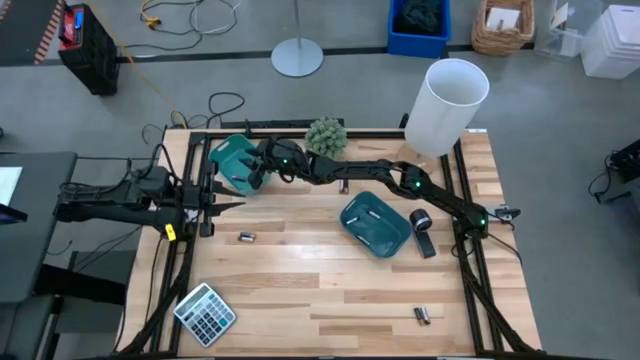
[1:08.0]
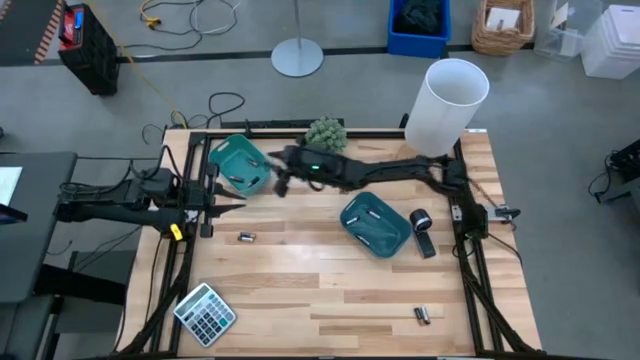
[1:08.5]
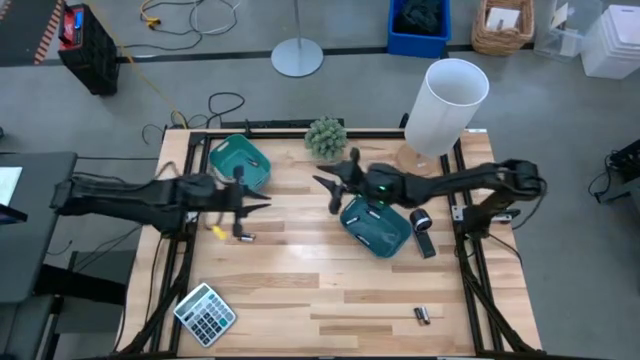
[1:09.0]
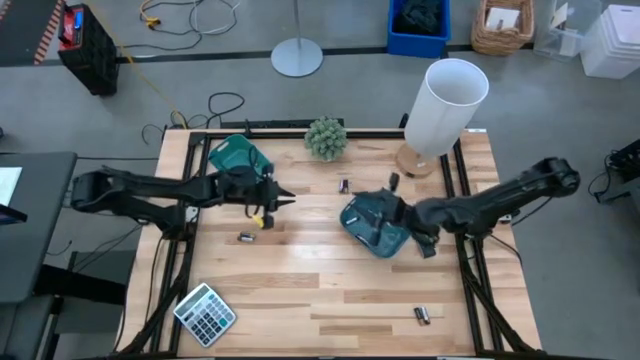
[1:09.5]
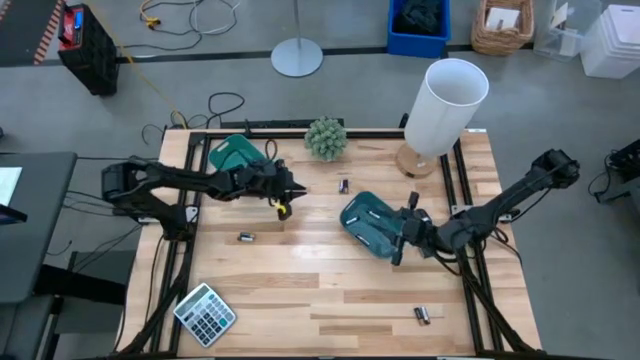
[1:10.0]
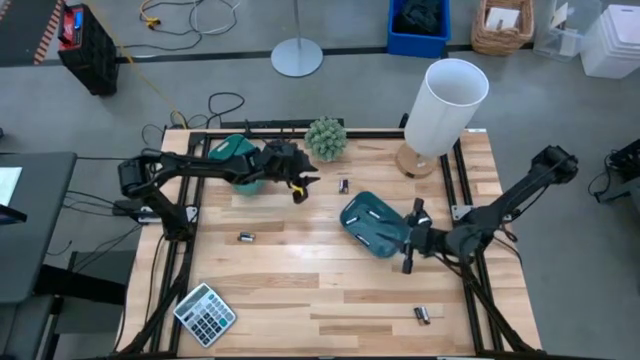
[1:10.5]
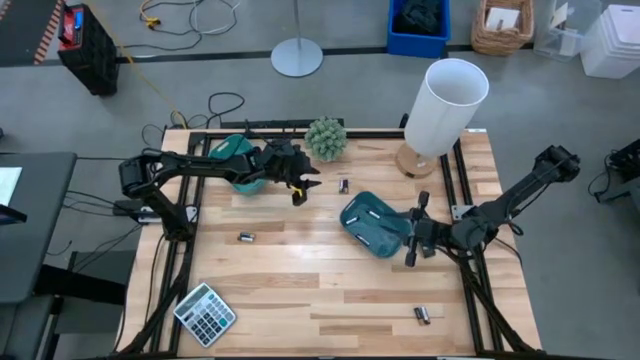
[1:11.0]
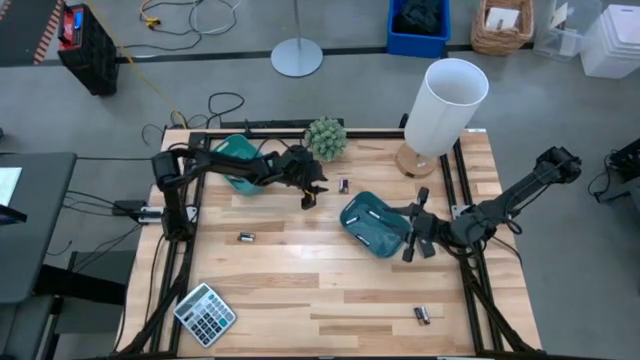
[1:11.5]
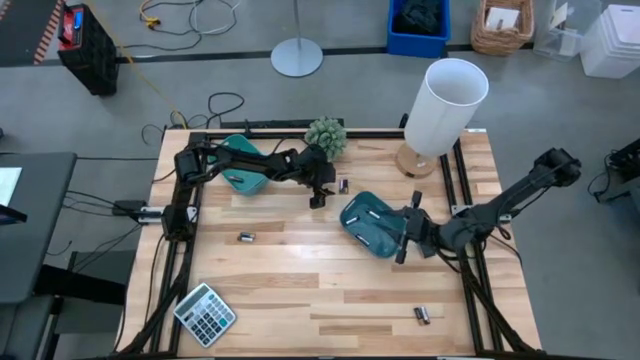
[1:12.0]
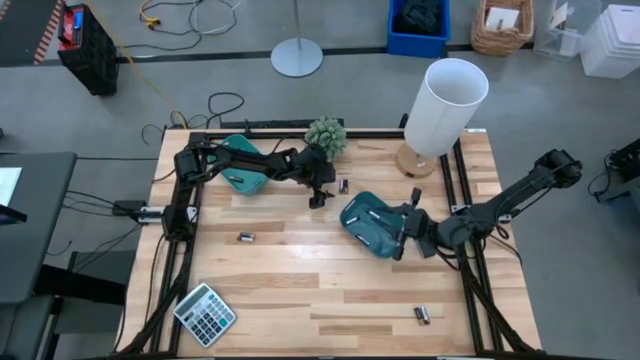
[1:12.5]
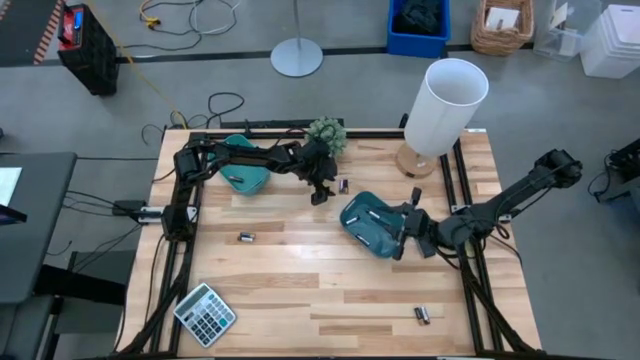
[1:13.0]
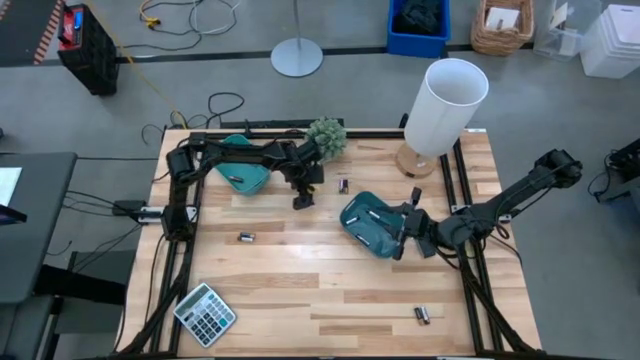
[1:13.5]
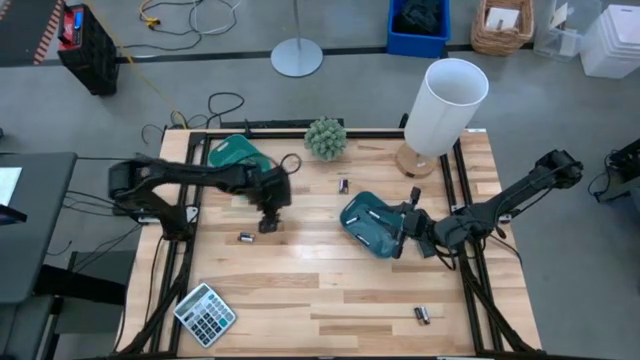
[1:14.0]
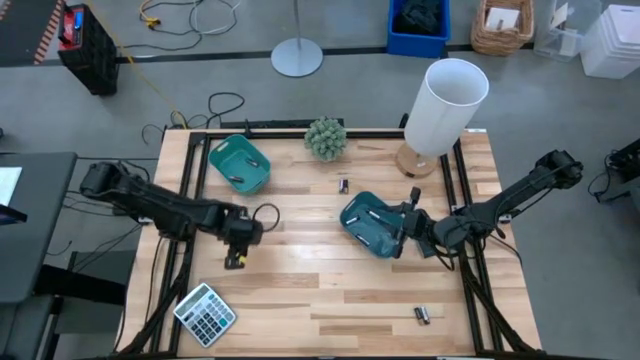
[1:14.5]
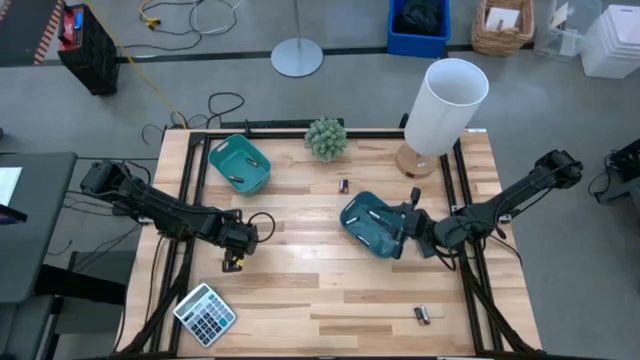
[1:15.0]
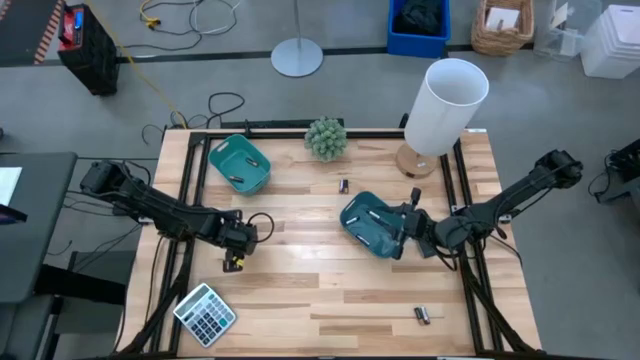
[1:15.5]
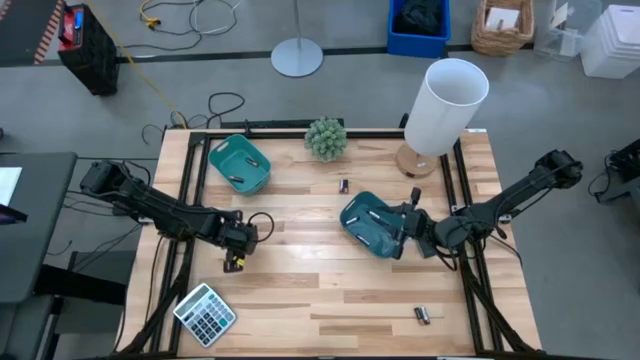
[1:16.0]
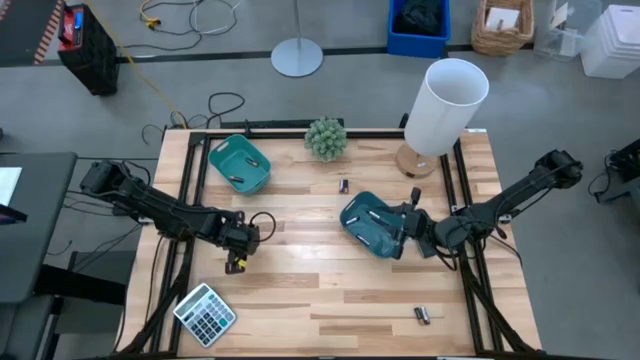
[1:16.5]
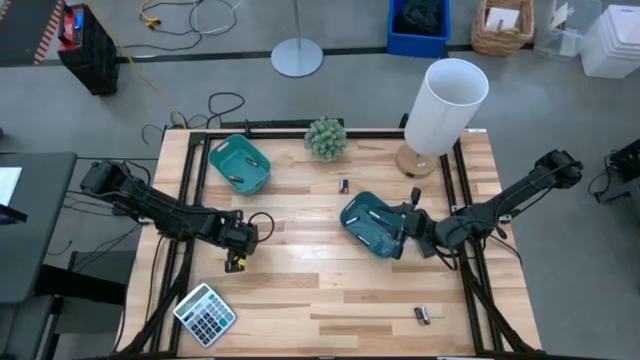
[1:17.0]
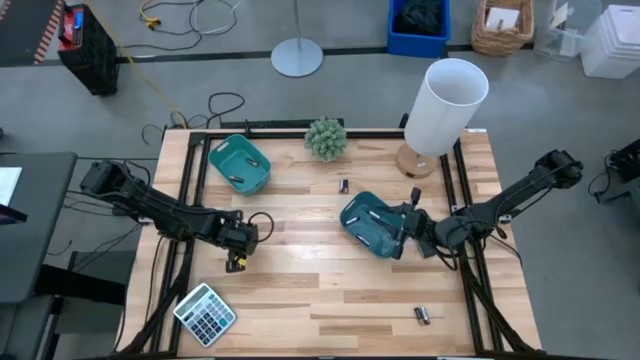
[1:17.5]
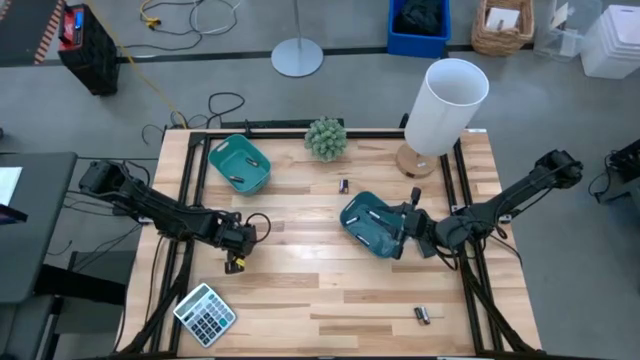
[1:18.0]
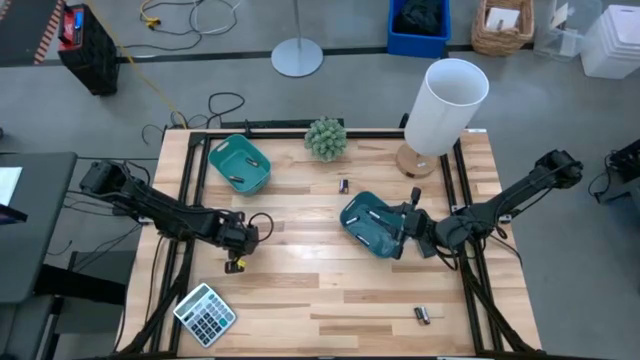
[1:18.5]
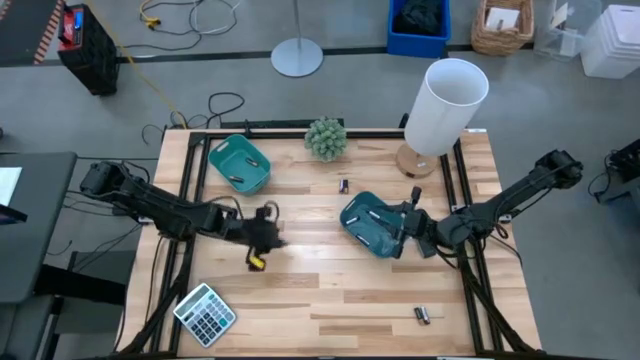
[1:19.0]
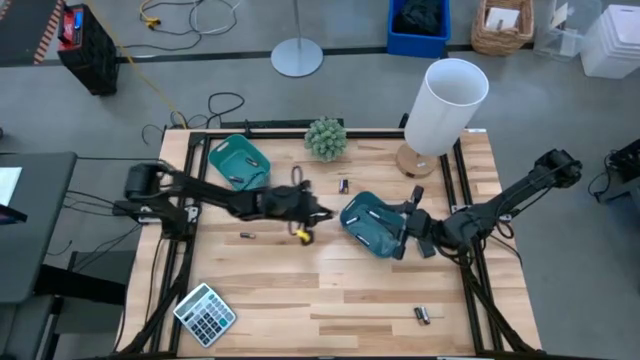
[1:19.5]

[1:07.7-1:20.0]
Task: Sort batteries
Put the silver battery into the blue bin

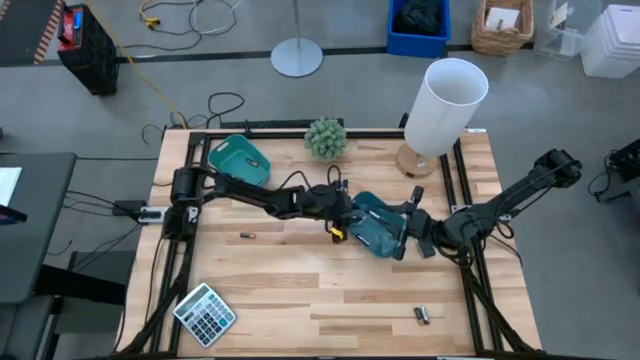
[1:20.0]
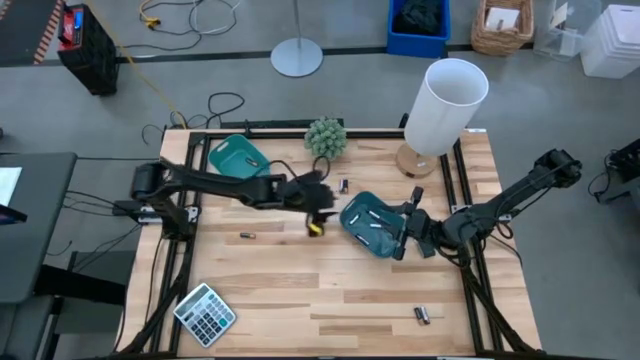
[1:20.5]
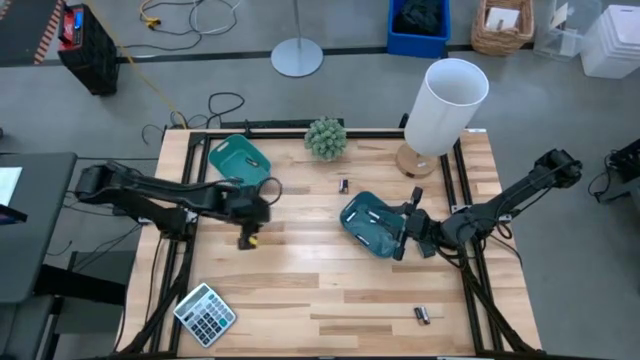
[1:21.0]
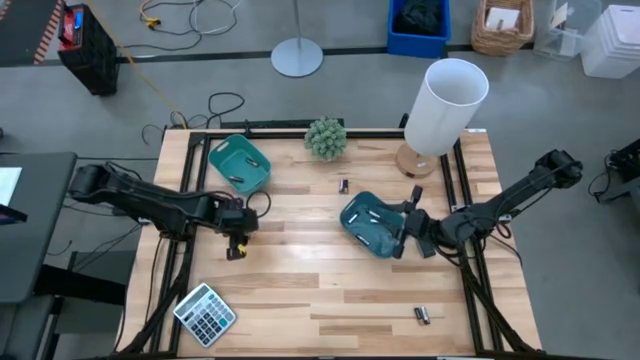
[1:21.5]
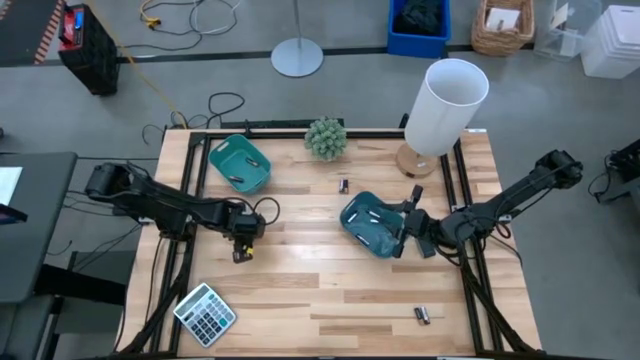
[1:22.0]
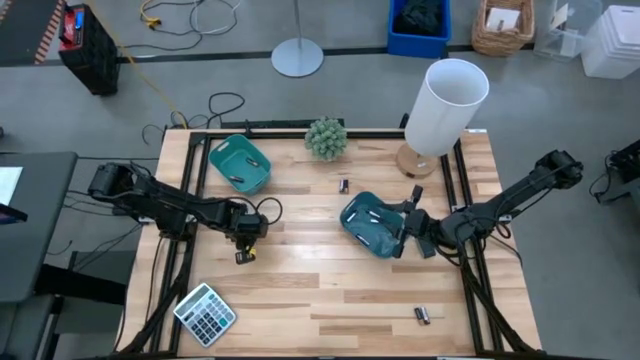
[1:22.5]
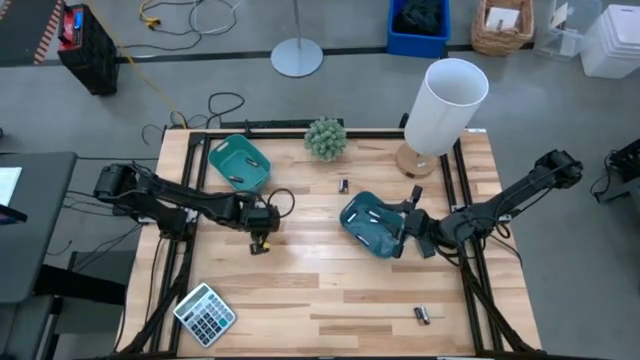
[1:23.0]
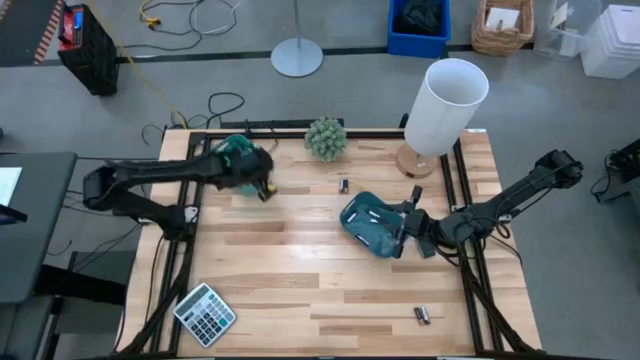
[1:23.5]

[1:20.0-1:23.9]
Put the black battery into the green bin

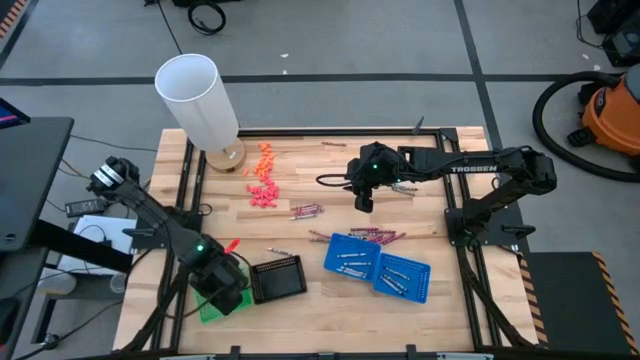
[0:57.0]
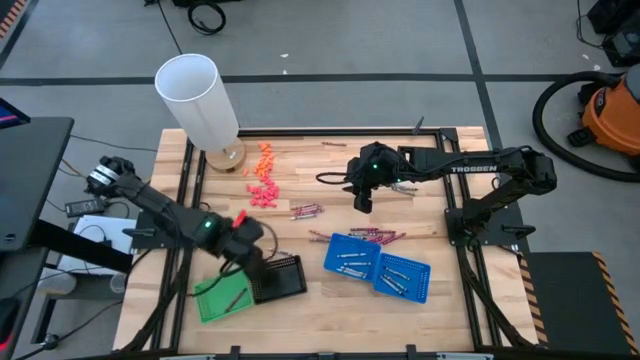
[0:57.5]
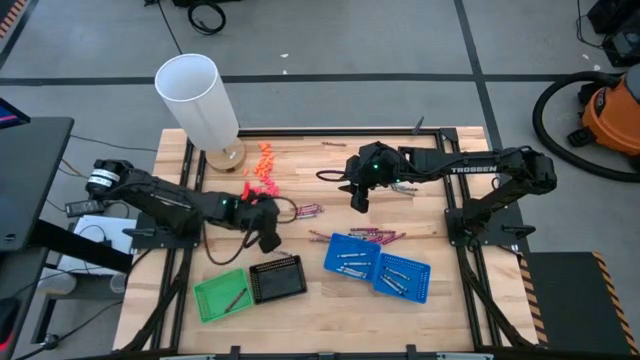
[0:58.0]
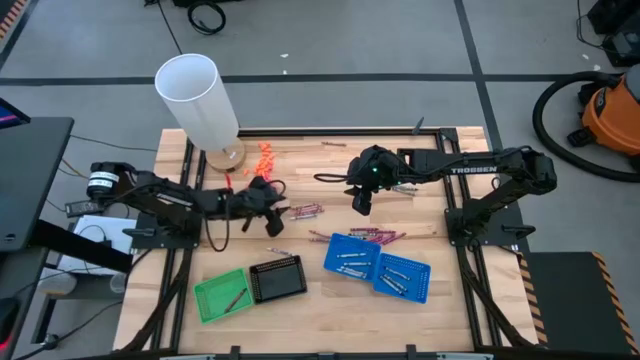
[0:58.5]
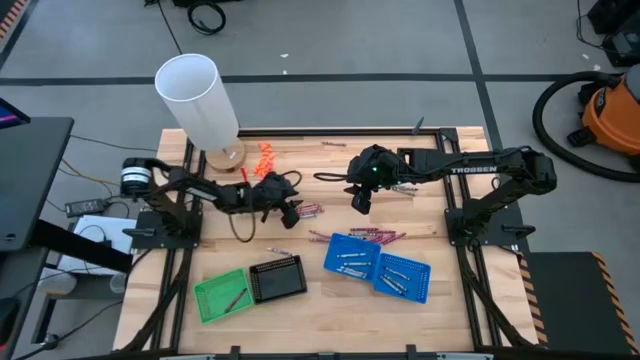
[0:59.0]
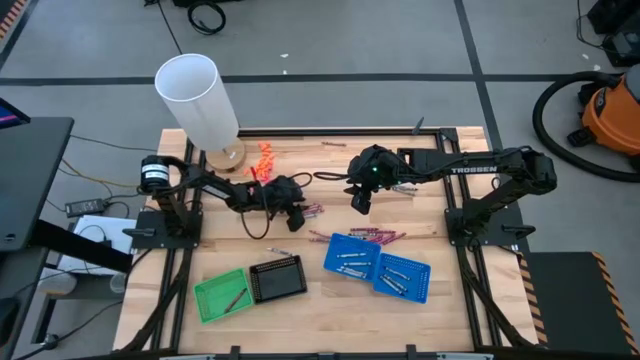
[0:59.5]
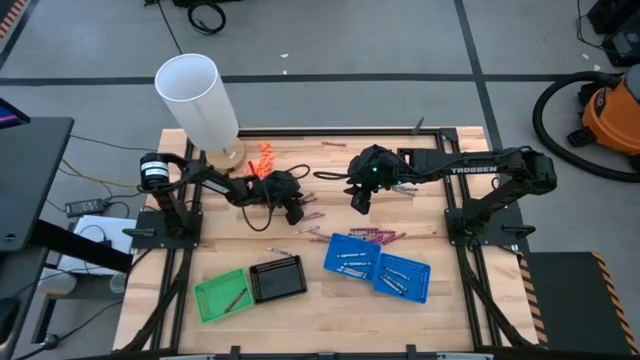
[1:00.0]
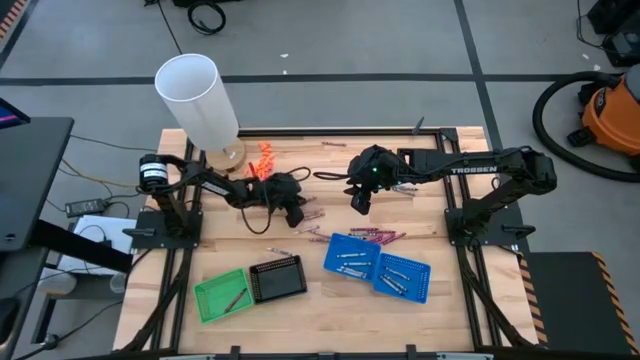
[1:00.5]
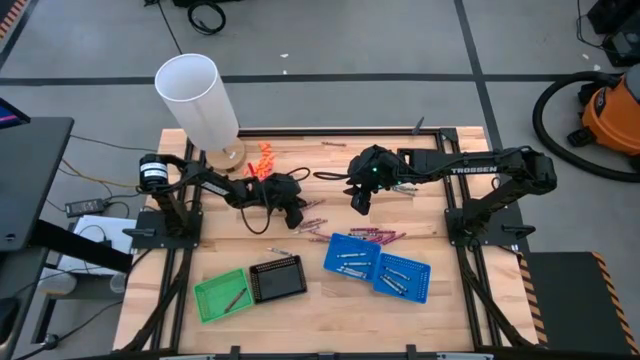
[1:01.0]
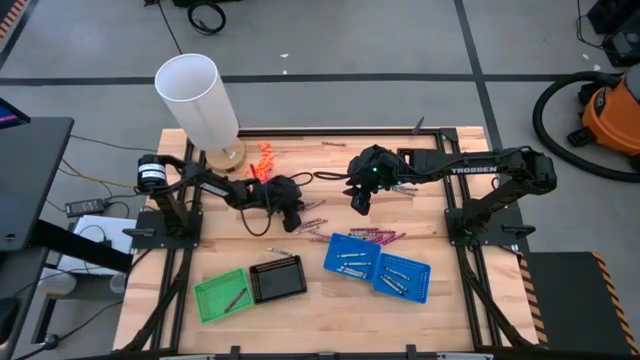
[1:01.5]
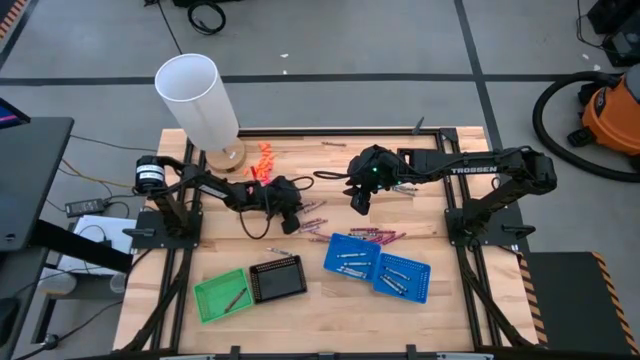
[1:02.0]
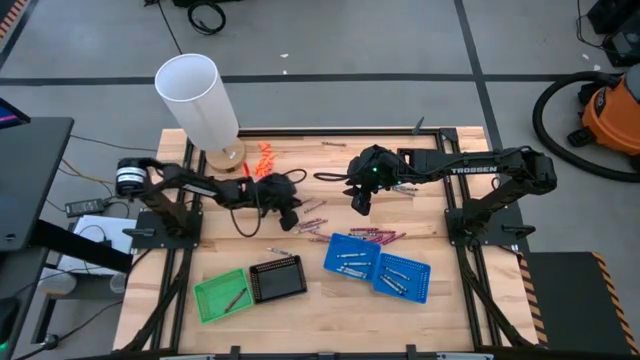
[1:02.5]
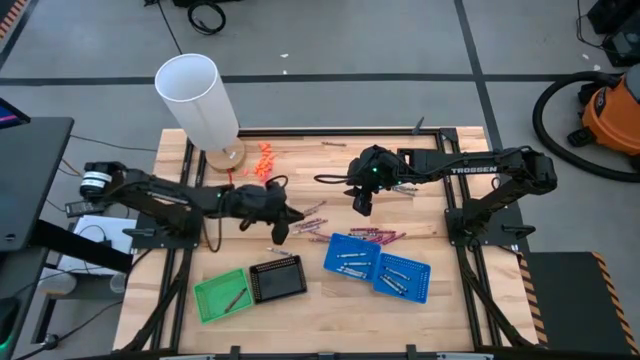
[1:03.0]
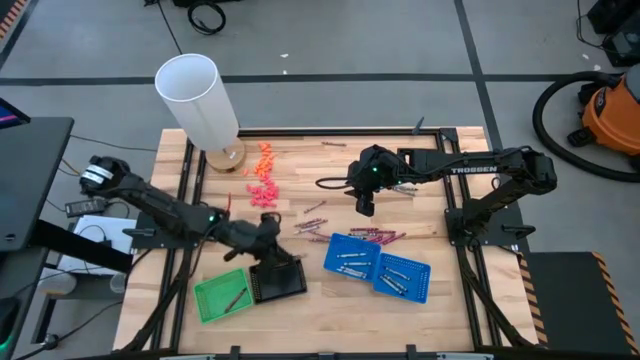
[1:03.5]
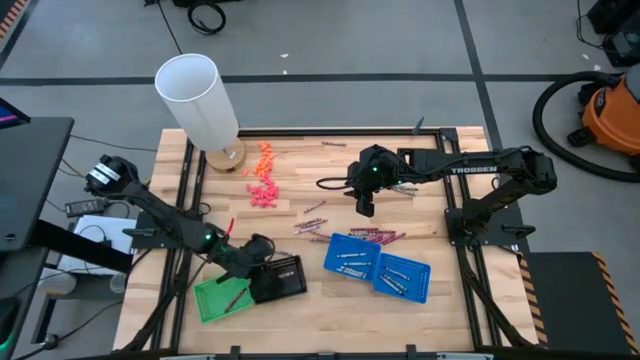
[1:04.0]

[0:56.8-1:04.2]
Task: Sort crayons
Put the pink crayon into the black bin
